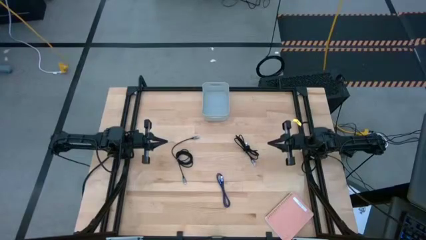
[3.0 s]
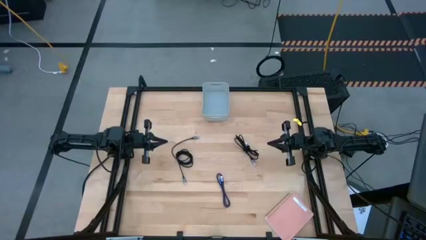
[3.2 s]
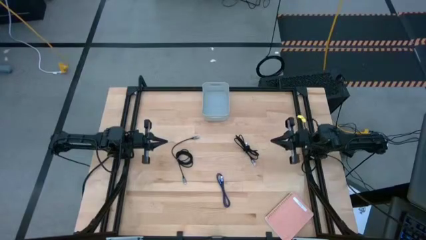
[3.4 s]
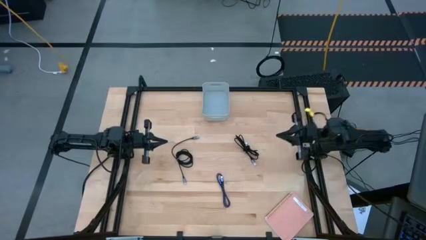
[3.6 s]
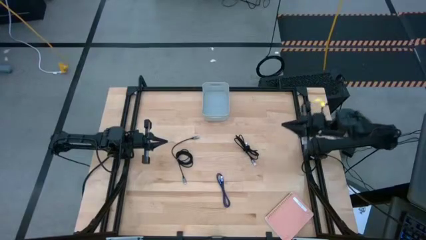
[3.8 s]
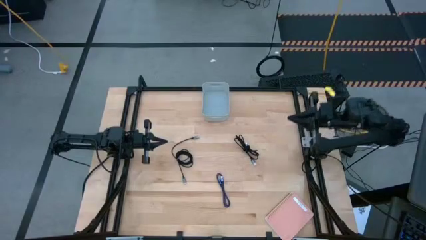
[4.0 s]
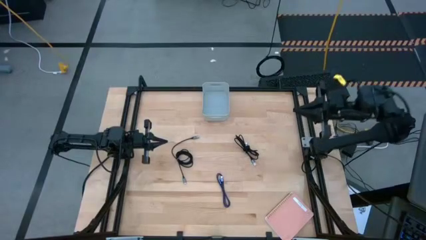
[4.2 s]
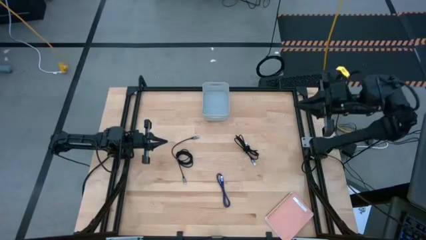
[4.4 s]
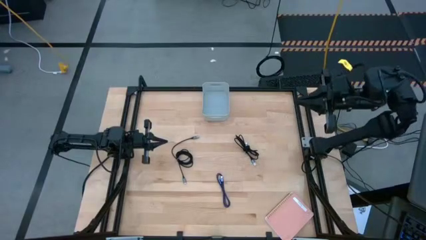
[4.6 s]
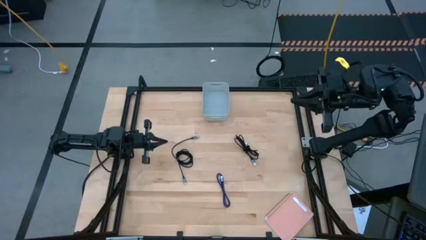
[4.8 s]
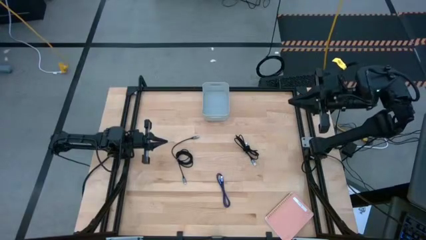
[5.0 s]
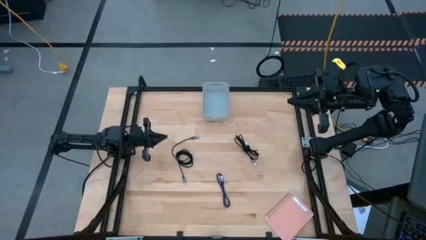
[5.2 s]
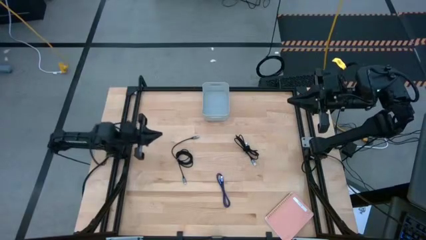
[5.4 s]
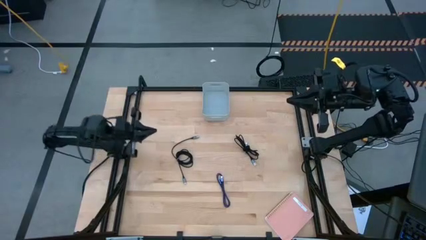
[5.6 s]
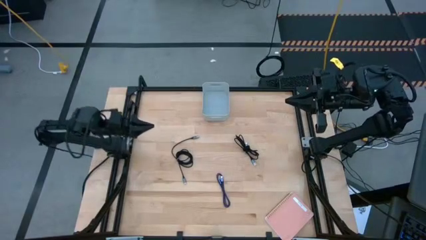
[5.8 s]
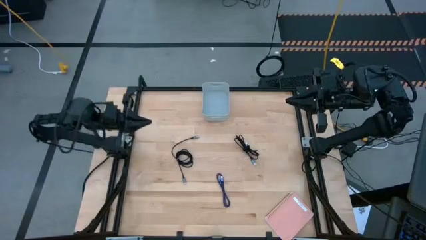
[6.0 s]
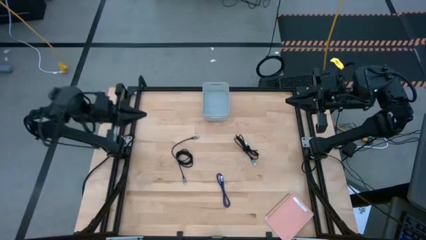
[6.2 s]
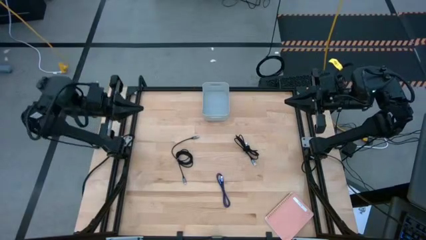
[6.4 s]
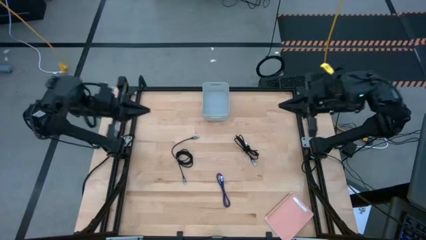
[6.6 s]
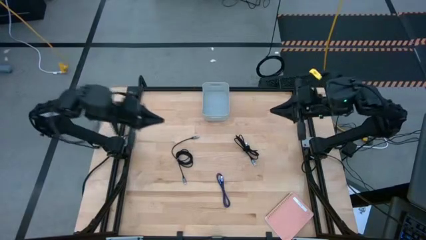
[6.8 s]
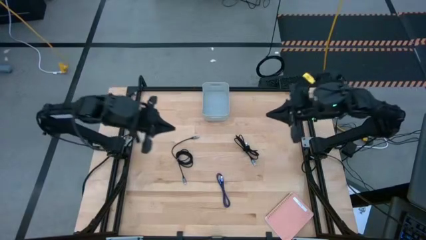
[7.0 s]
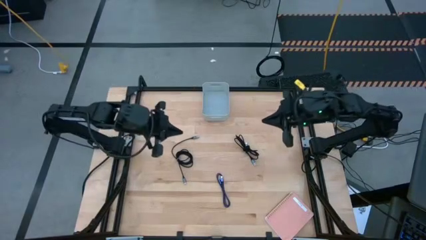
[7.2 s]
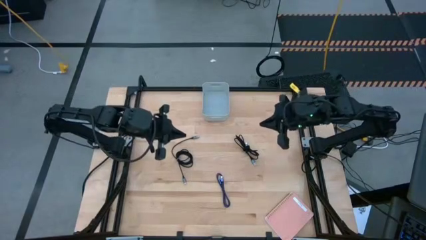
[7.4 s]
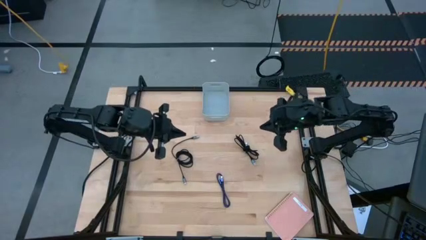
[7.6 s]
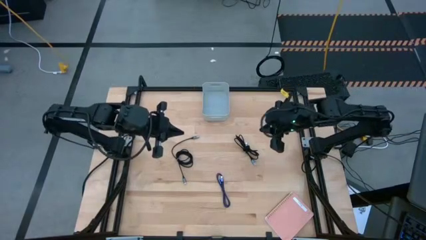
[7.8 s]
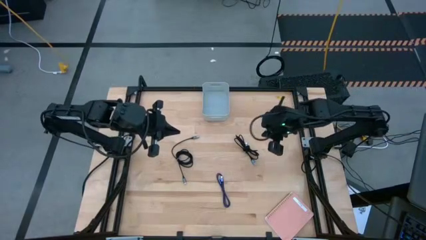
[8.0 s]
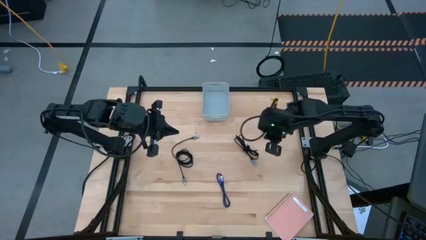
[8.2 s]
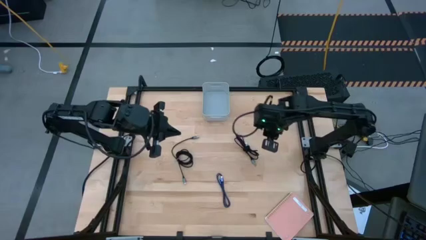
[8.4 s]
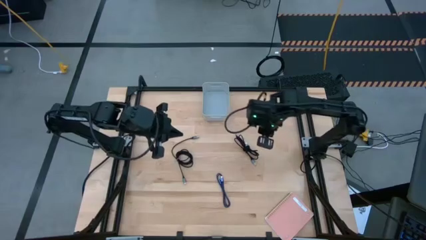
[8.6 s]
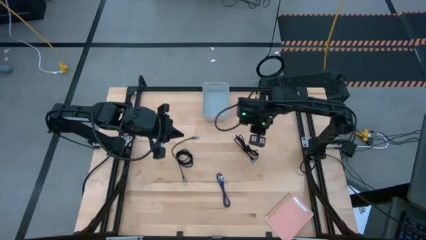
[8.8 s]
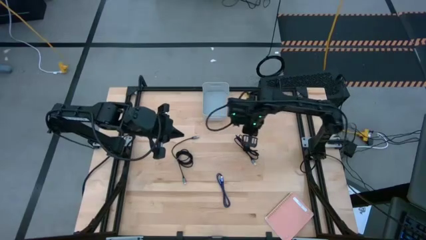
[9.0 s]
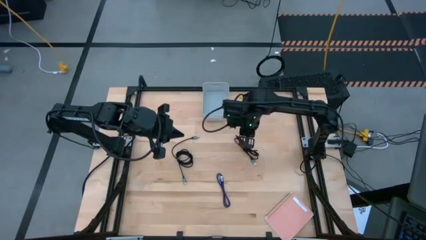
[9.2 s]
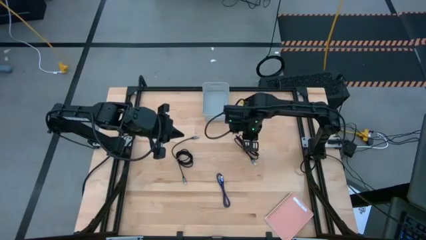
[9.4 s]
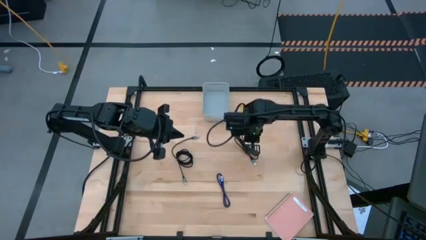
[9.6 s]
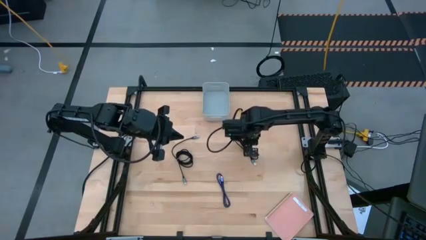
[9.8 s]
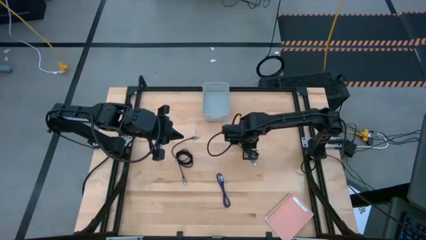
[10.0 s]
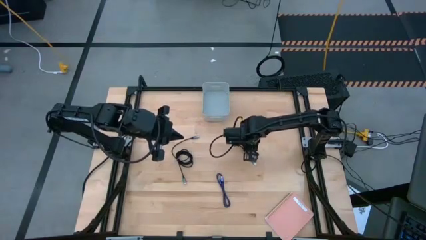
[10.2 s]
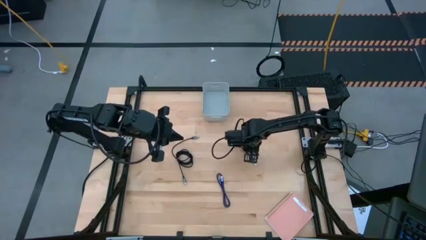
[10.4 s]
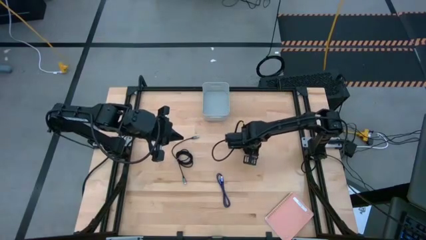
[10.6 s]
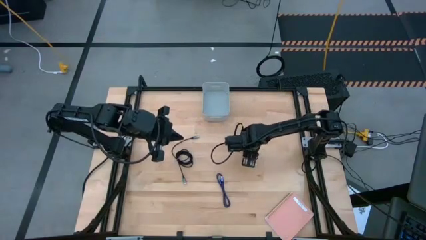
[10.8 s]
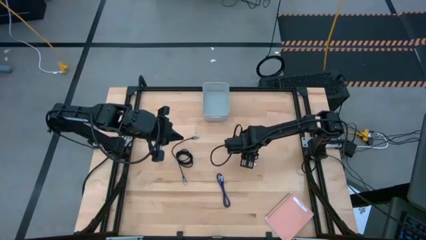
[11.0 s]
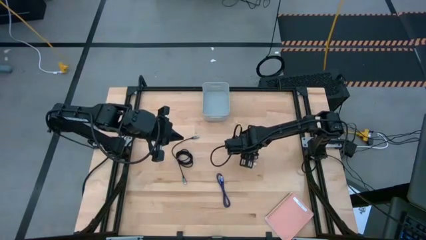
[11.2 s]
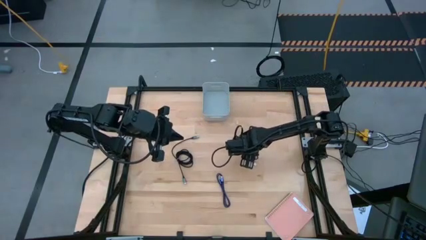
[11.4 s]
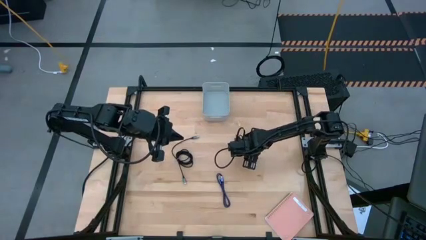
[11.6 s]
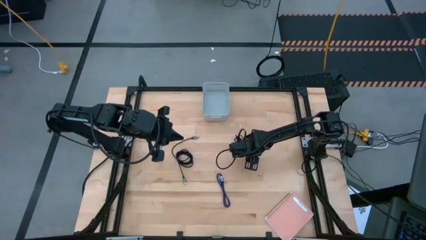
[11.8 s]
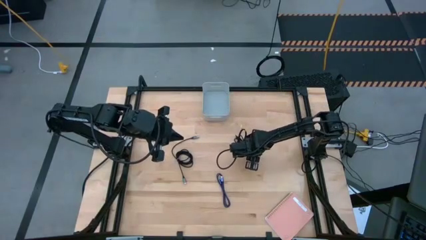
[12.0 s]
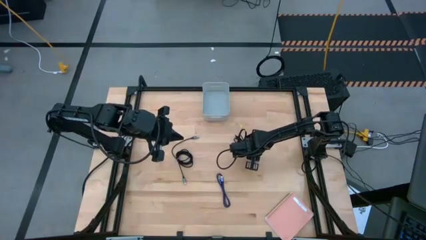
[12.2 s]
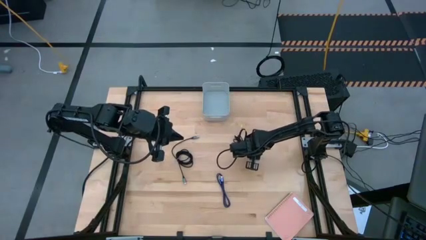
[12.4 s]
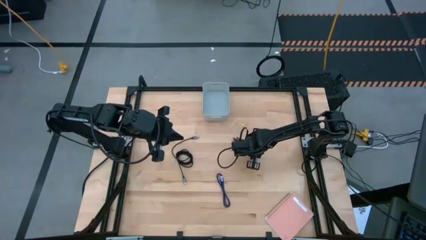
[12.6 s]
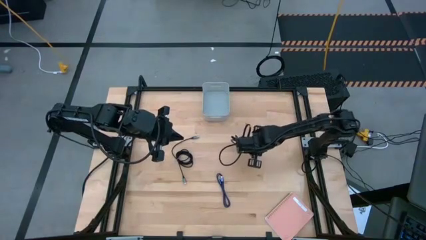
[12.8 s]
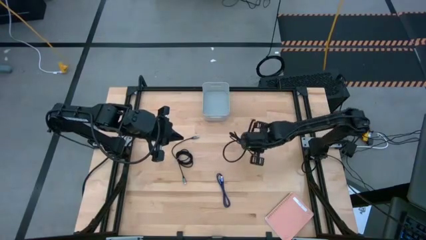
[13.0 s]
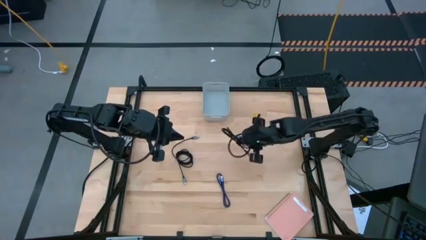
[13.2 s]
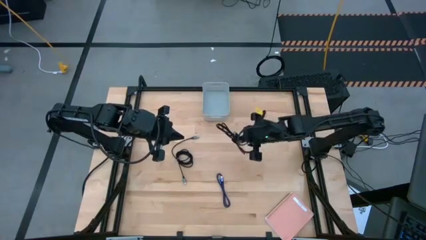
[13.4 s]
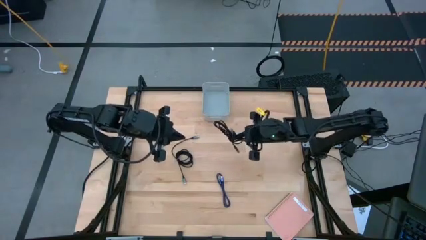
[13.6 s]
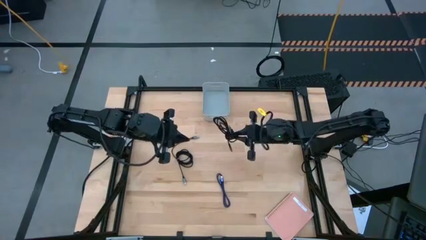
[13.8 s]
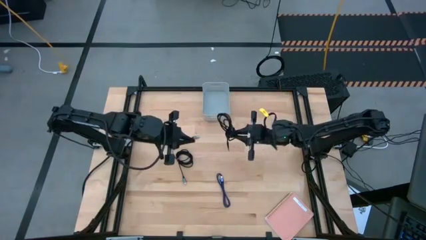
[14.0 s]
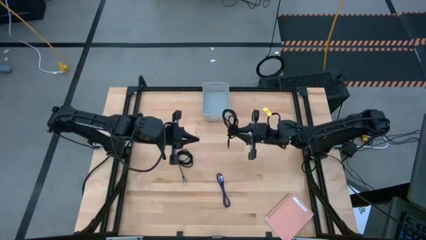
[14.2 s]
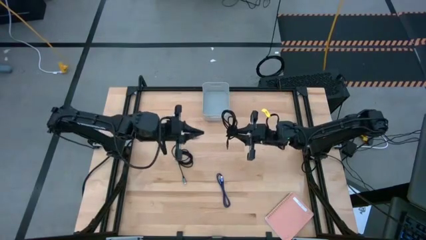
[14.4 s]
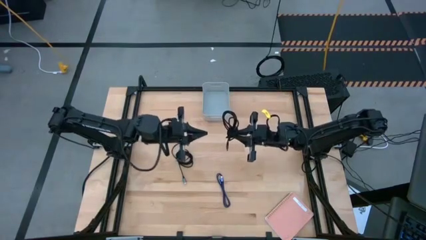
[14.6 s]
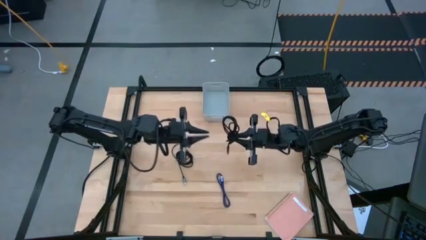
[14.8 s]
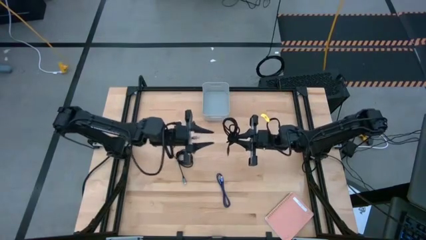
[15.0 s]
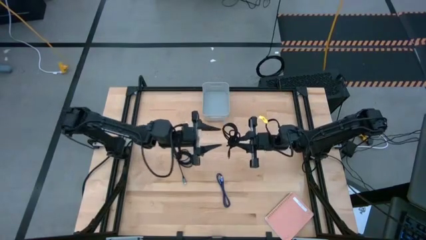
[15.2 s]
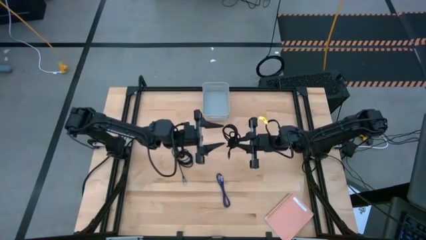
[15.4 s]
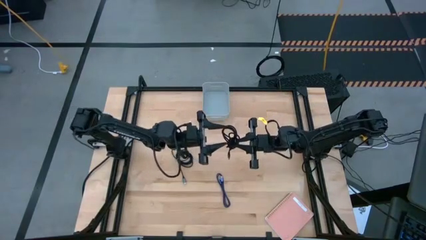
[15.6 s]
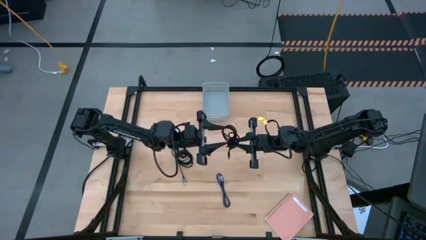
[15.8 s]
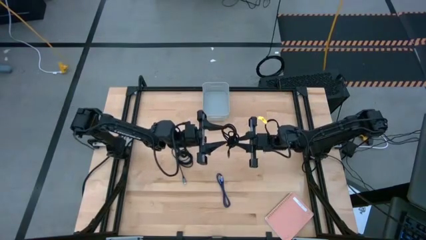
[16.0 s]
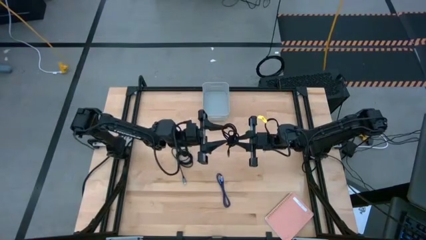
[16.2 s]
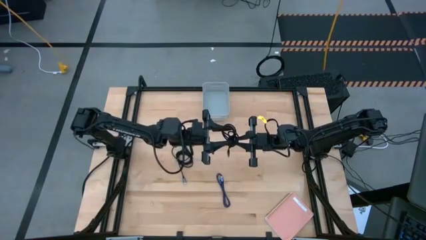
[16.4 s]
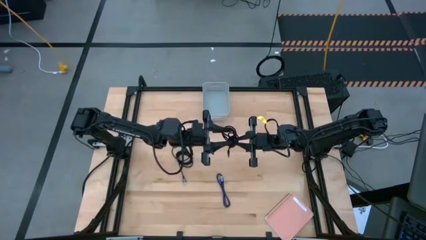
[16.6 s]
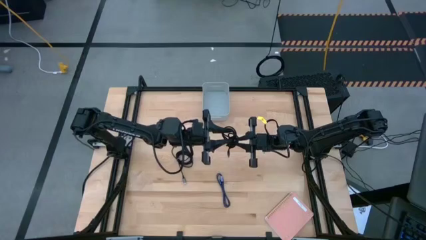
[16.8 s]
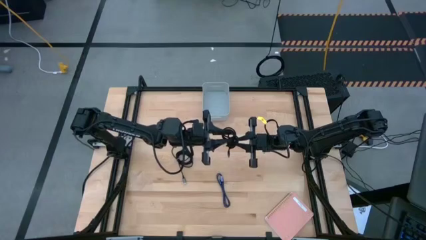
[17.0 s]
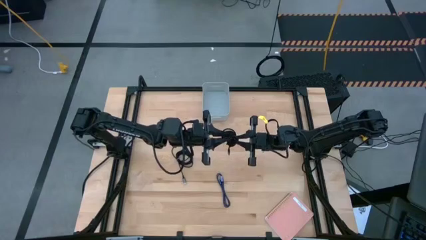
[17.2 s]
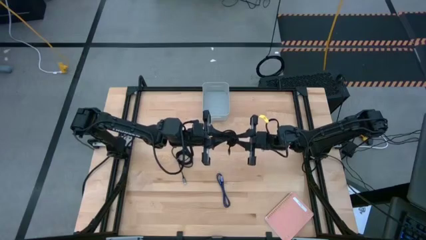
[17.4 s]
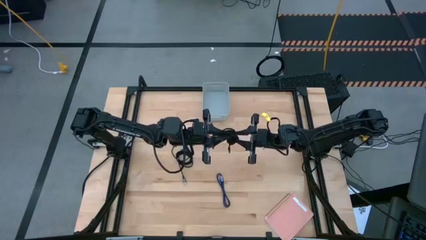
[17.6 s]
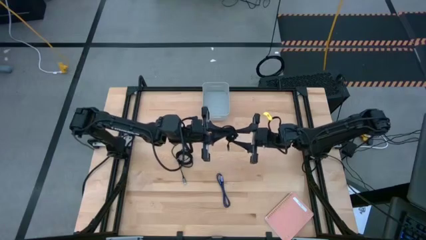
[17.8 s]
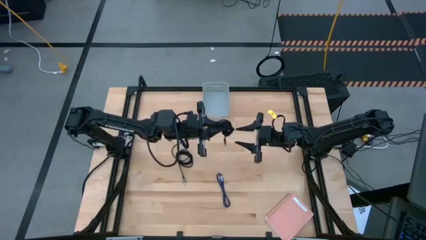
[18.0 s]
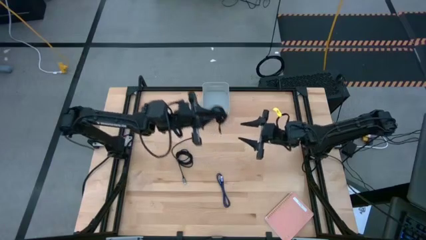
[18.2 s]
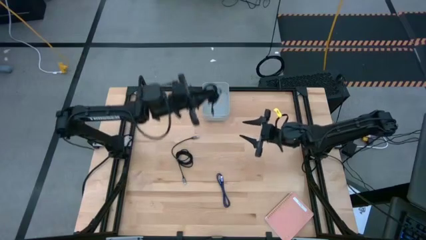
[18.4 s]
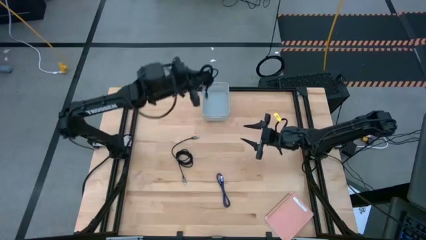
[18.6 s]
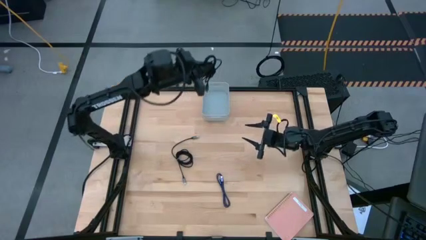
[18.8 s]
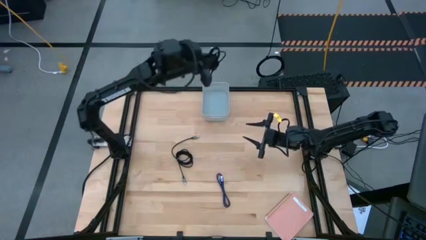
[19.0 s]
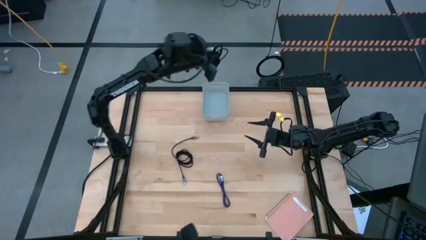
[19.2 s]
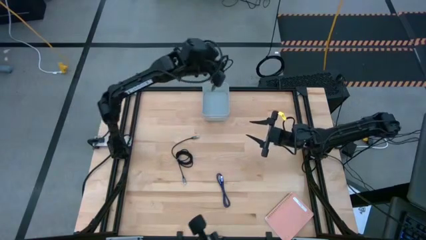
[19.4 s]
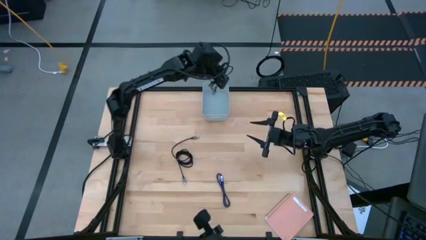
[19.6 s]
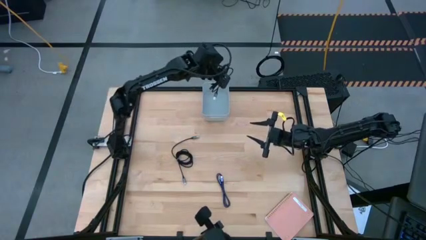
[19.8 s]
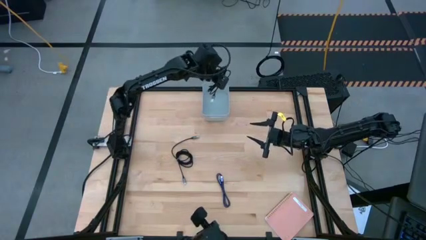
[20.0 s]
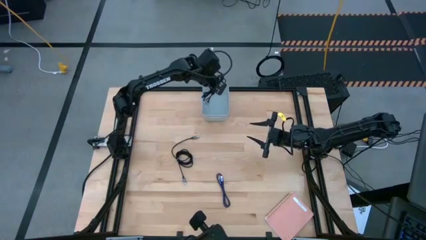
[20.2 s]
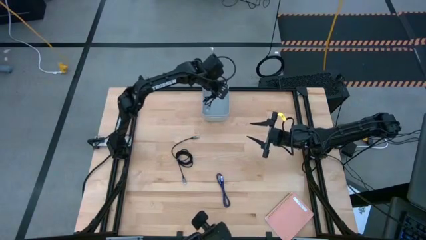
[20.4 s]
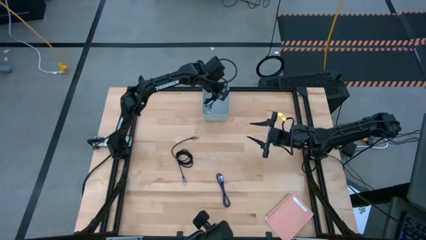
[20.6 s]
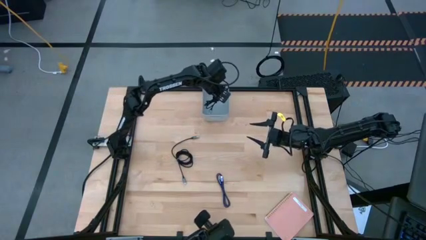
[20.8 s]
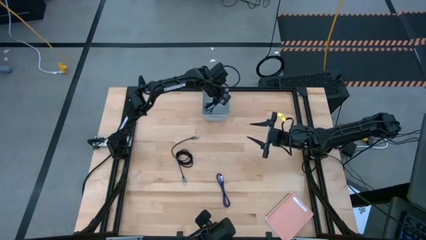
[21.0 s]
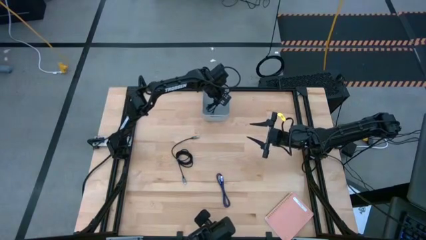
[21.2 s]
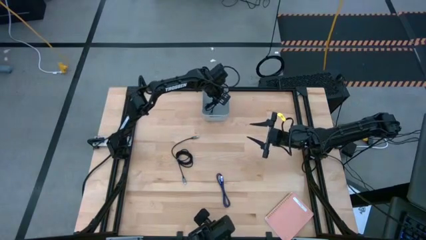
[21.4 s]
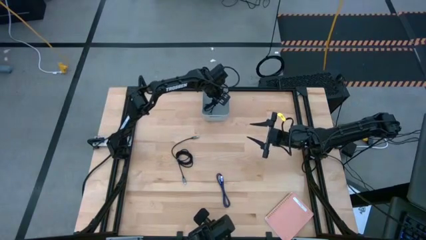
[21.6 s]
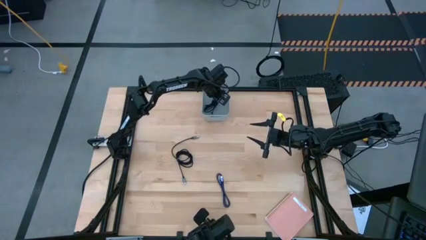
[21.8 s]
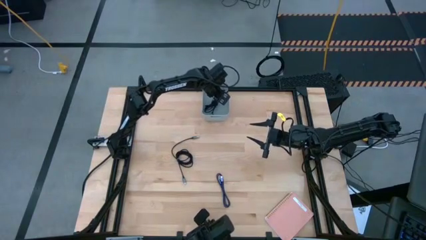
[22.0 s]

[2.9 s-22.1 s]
Task: Pick and place USB-C Cables
Put the right black charger cable into the gray bin
